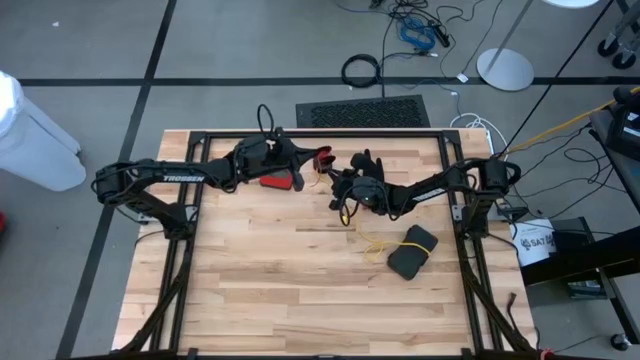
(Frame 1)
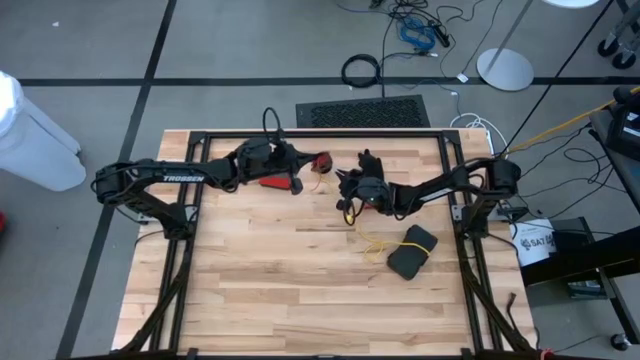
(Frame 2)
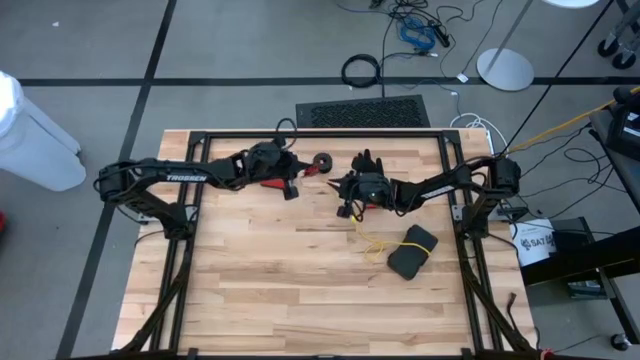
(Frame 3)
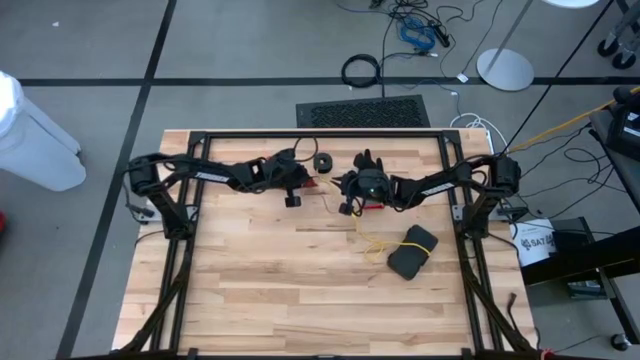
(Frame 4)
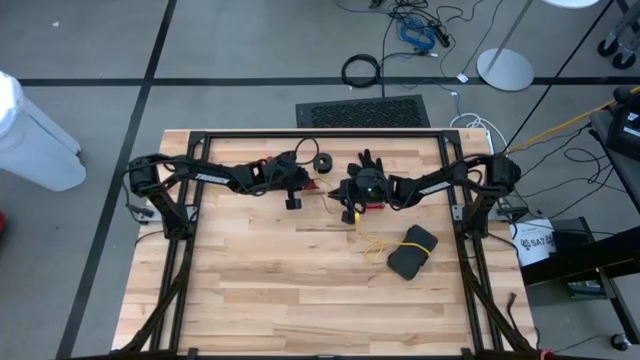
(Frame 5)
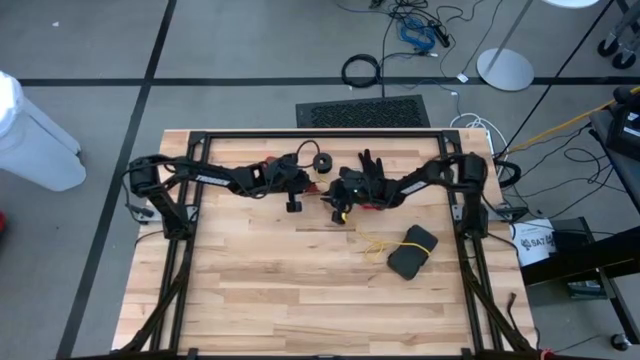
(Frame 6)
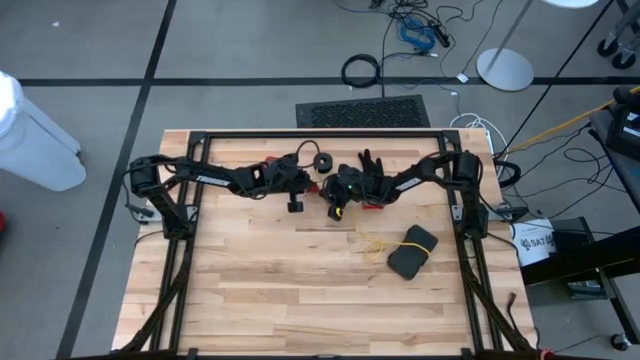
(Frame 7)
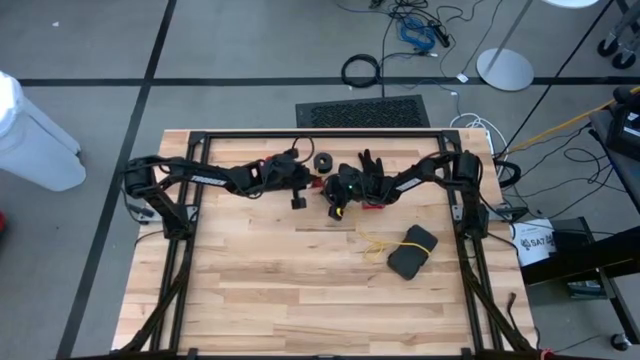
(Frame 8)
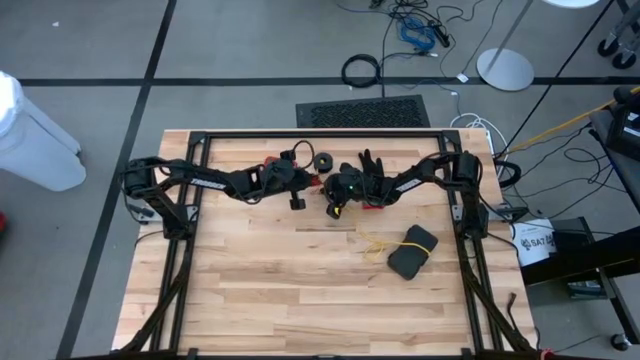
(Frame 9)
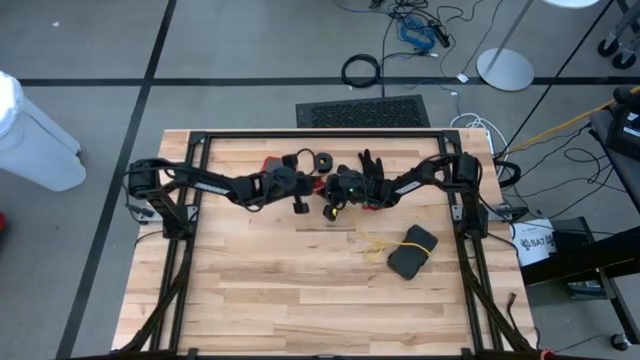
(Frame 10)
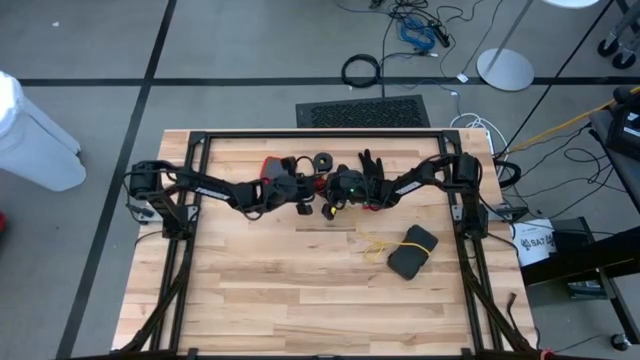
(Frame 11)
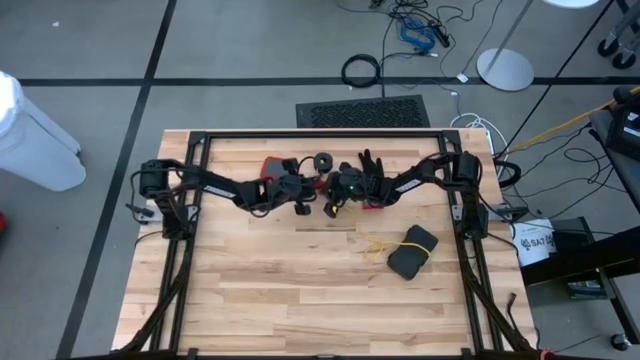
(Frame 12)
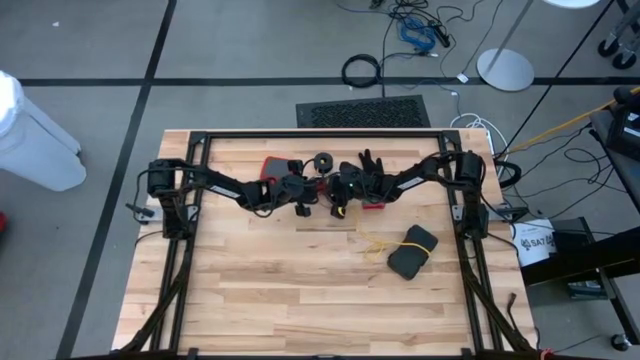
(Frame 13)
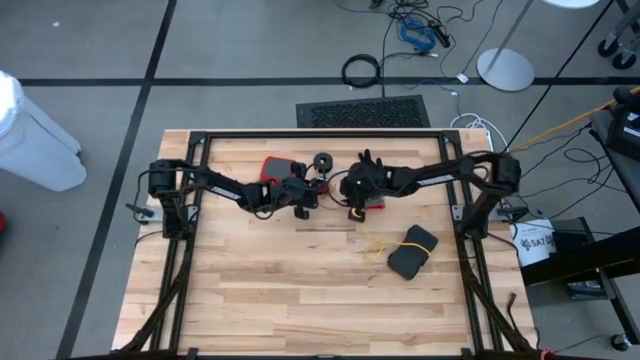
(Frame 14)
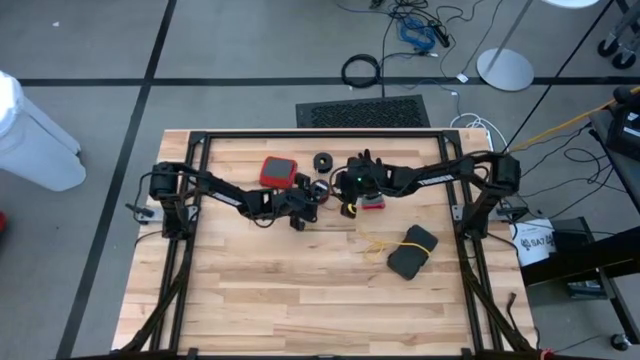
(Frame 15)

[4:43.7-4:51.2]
Task: Coil cords
Coil the red wire onto spool

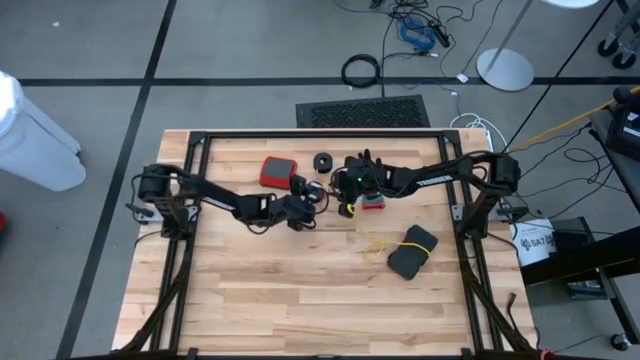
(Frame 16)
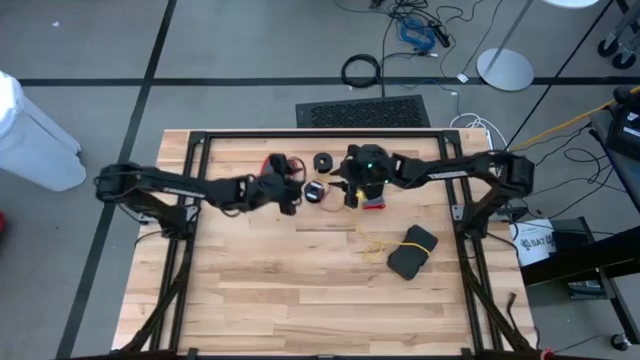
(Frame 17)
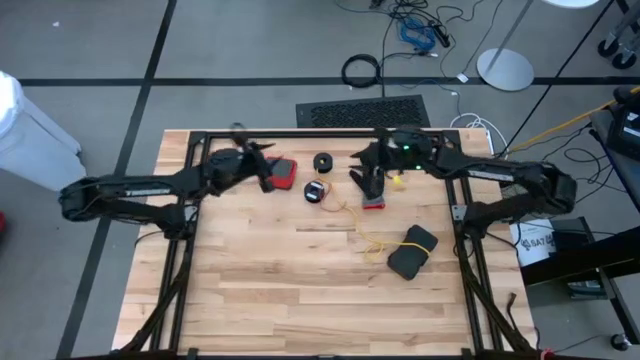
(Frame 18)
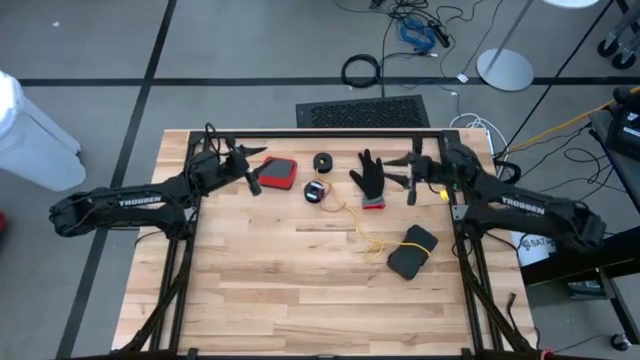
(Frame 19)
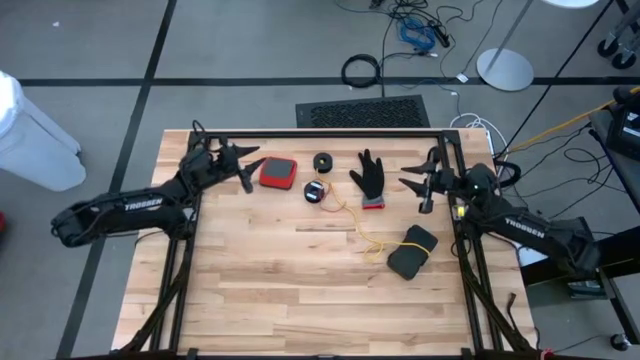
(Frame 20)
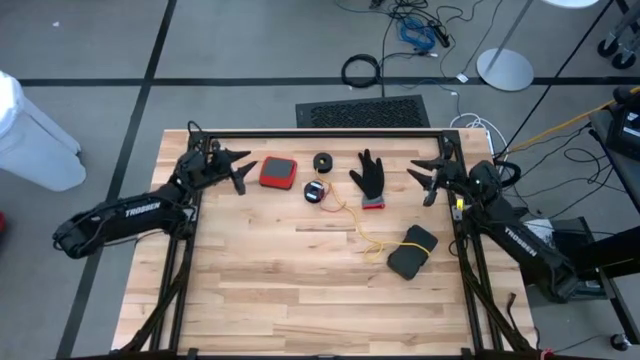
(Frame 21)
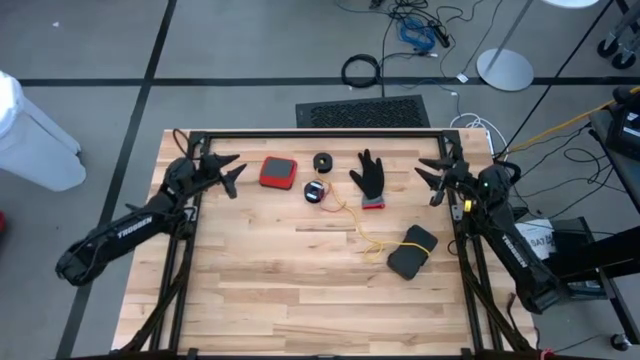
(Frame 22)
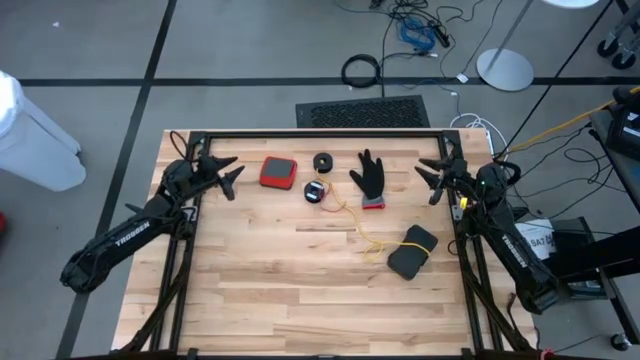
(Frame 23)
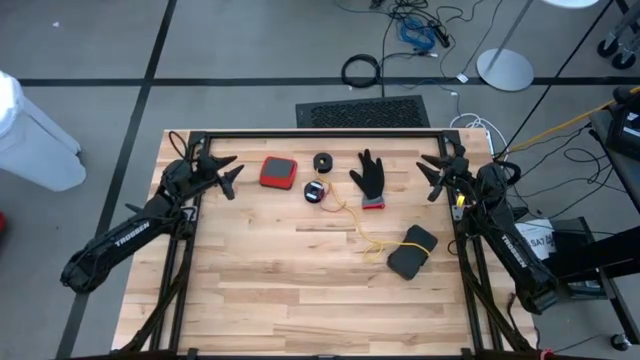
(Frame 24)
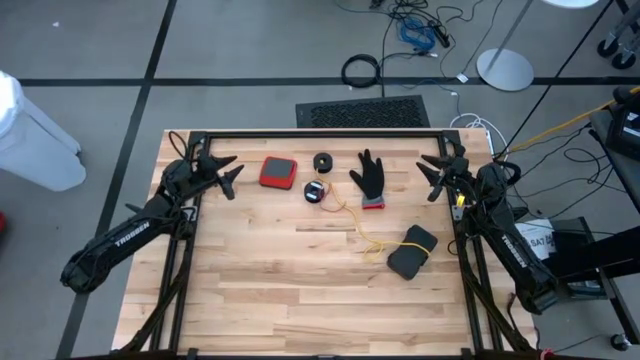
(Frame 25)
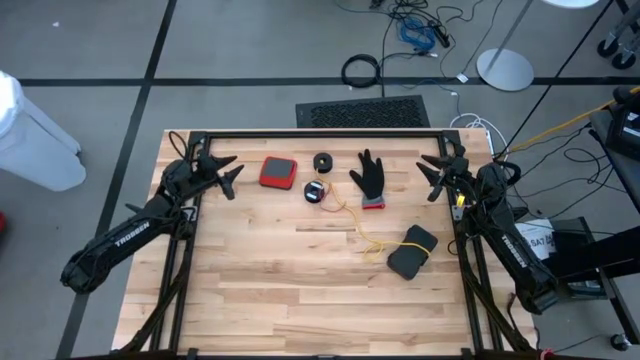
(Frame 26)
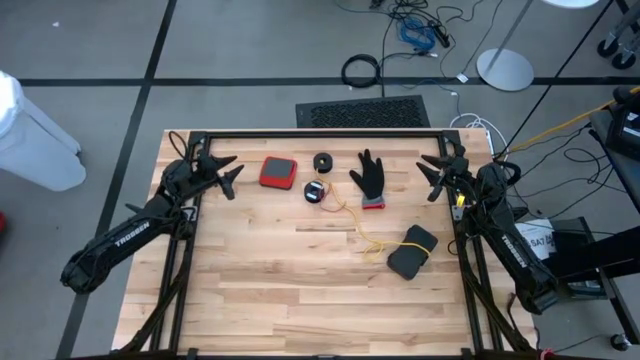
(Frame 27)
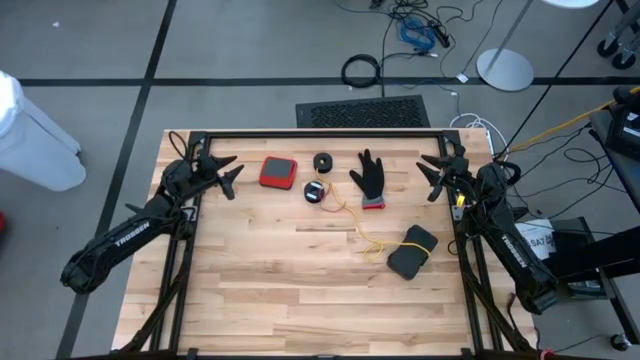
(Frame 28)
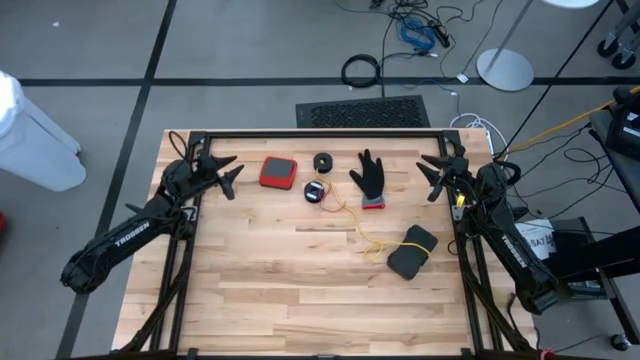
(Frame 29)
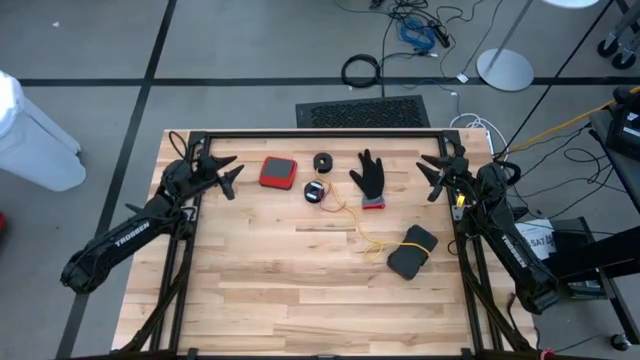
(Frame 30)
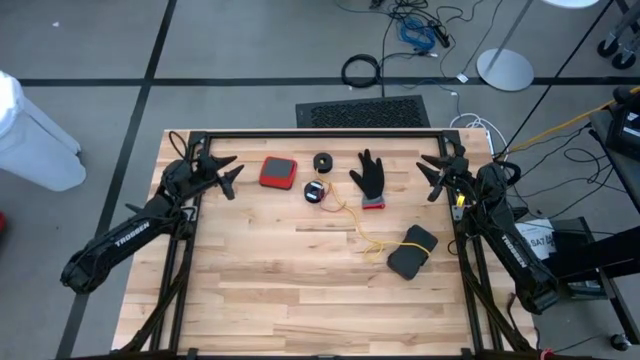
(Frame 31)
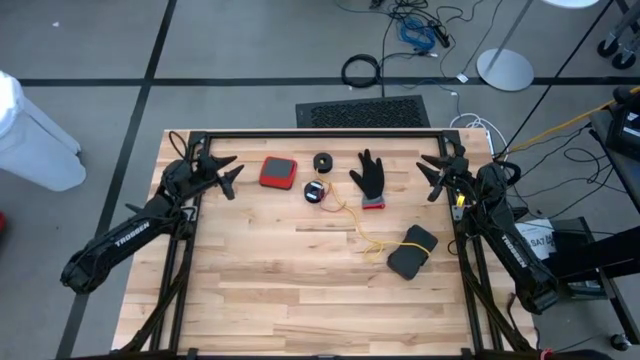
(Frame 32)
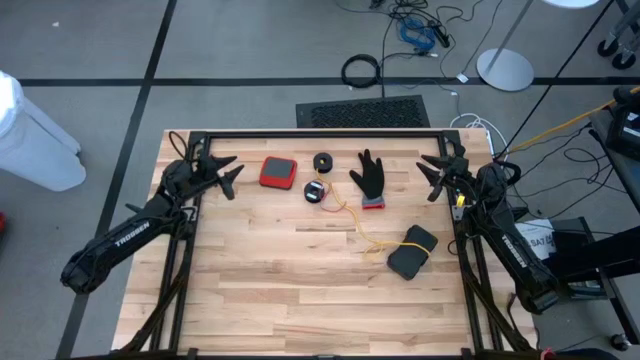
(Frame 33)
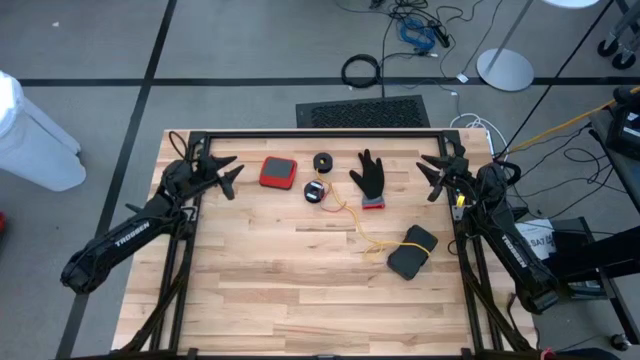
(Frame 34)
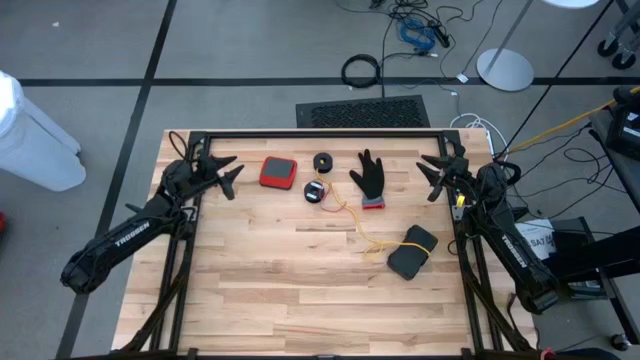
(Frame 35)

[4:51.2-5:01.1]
Return to Home Position

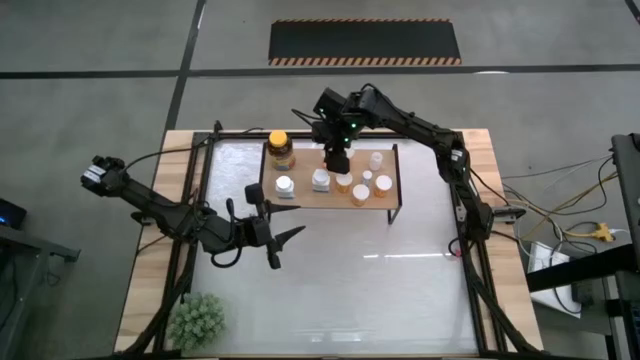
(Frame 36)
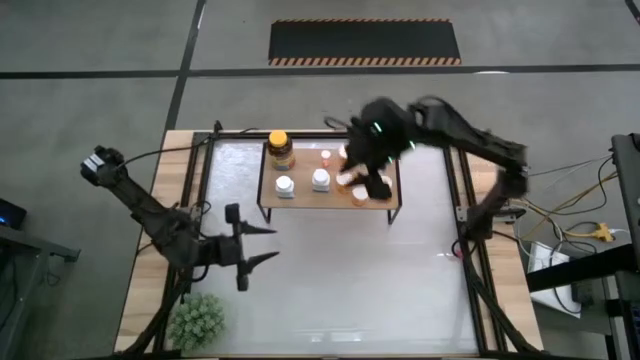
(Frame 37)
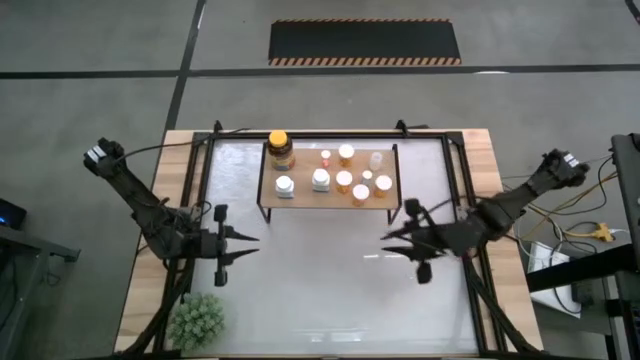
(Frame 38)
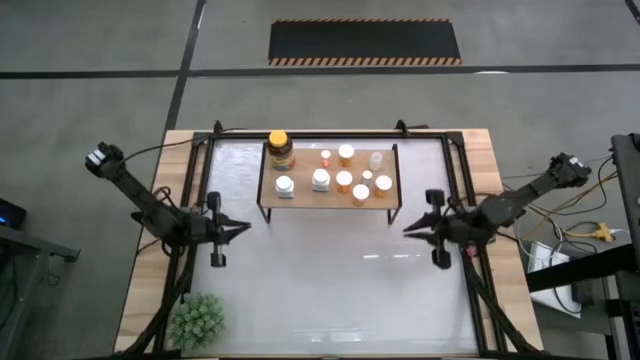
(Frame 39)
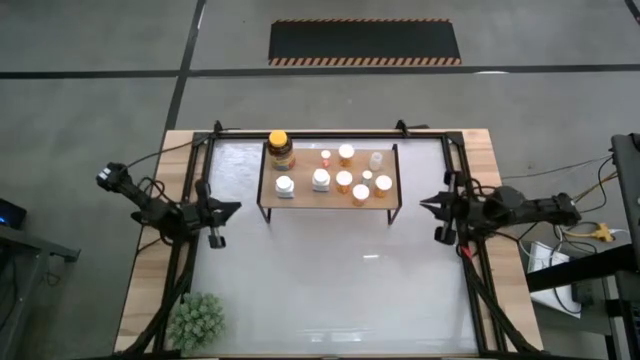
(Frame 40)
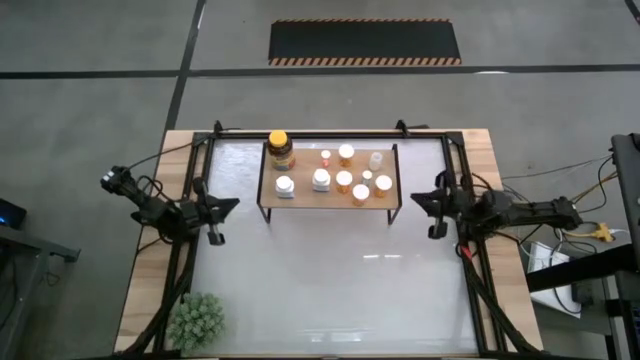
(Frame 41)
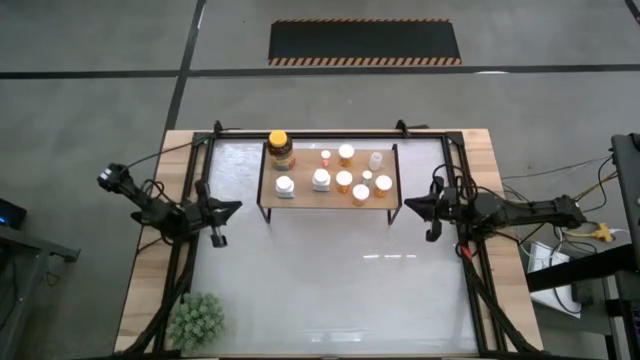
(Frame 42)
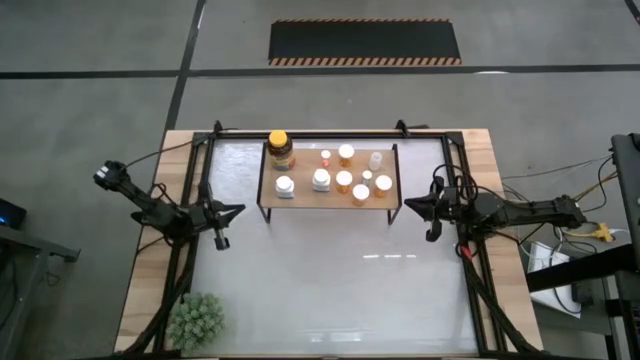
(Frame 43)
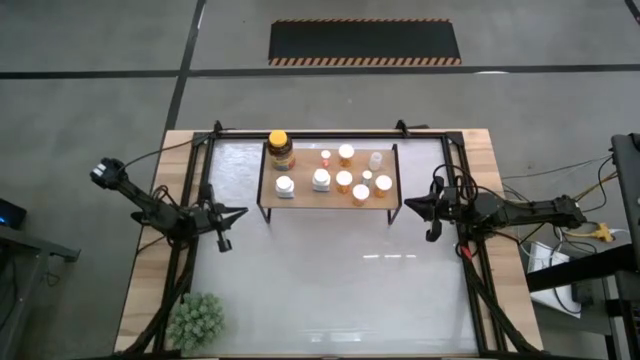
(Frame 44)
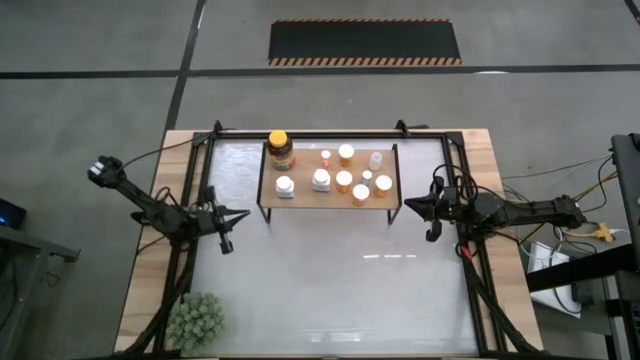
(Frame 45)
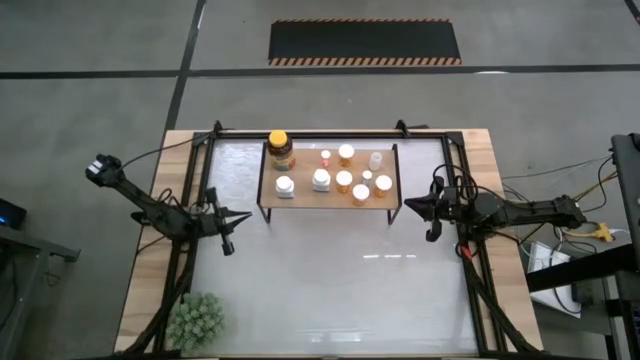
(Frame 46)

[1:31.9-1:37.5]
Task: Pick and place medicine bottles onto shelf by color
Return to Home Position
